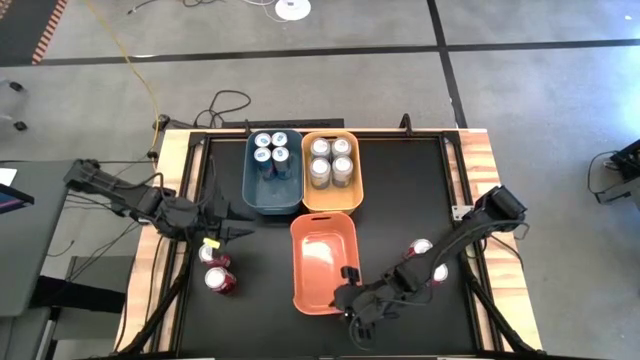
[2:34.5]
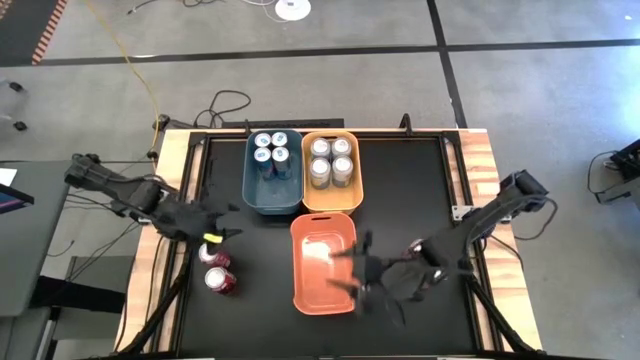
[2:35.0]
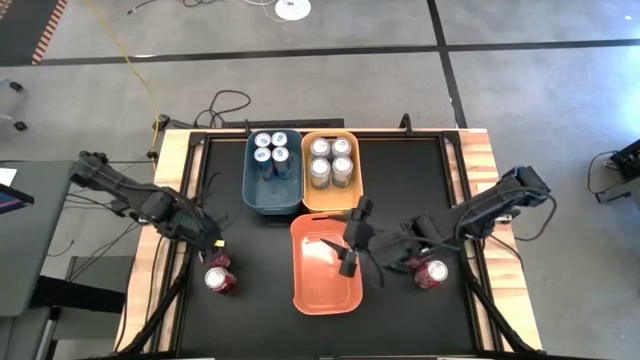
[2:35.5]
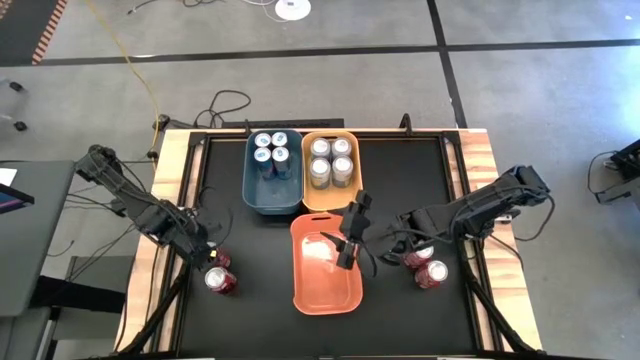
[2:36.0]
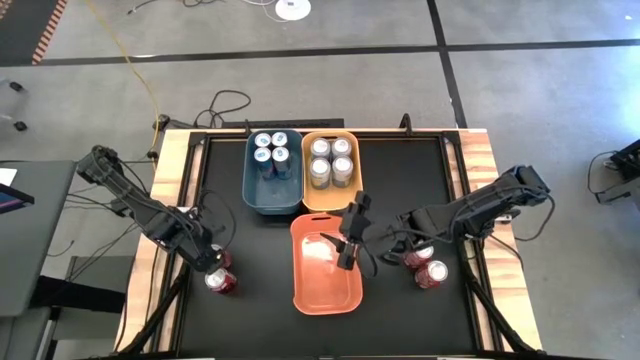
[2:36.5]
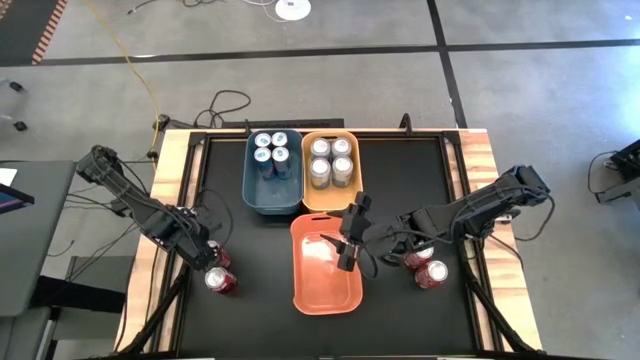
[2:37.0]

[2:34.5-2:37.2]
Task: Sort soda cans
Put the red soda can into the orange bin

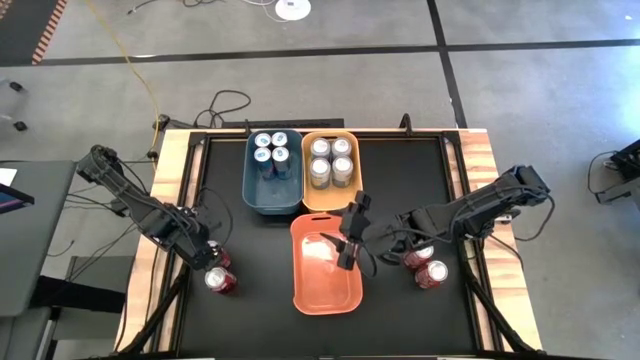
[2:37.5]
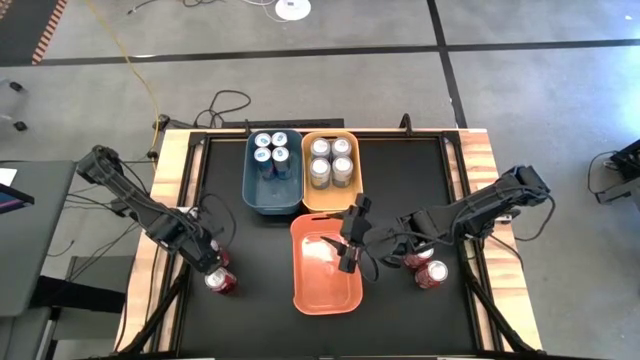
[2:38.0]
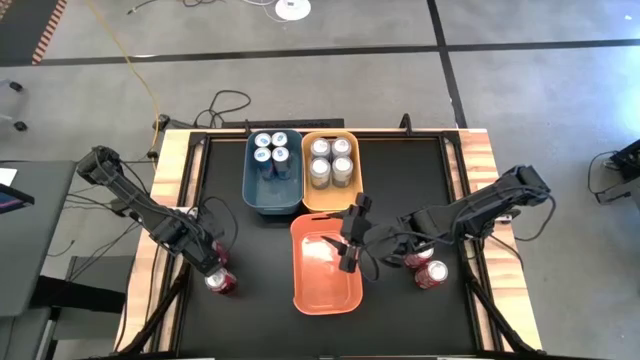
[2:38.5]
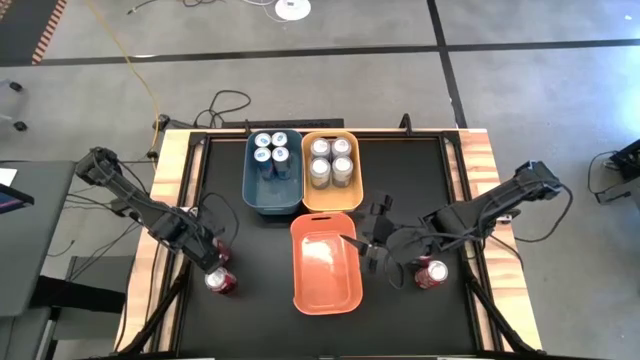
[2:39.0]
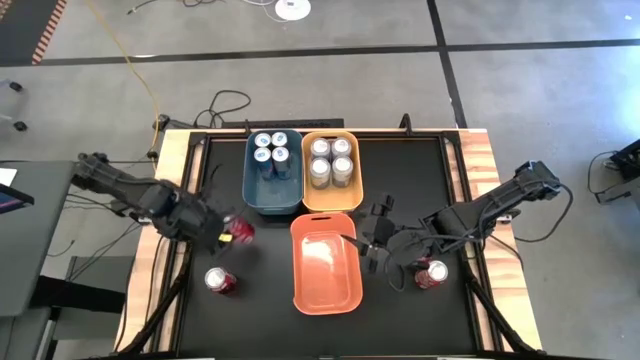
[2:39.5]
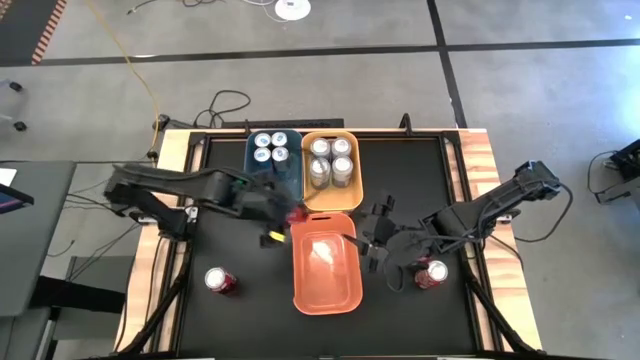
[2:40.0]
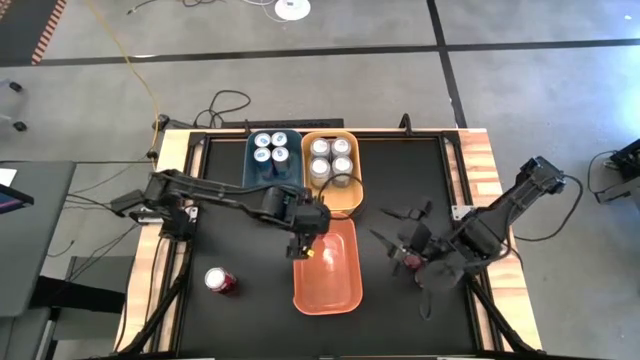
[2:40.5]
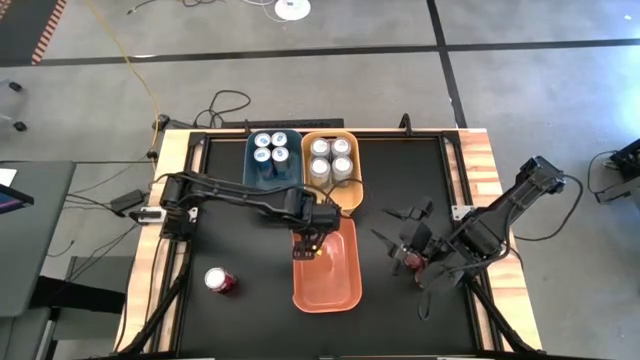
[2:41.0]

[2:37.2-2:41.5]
Put the red soda can into the orange bin

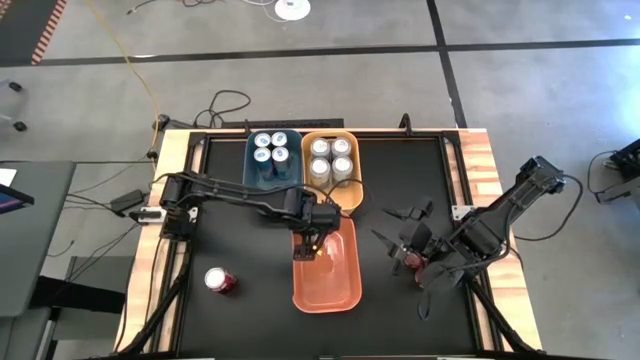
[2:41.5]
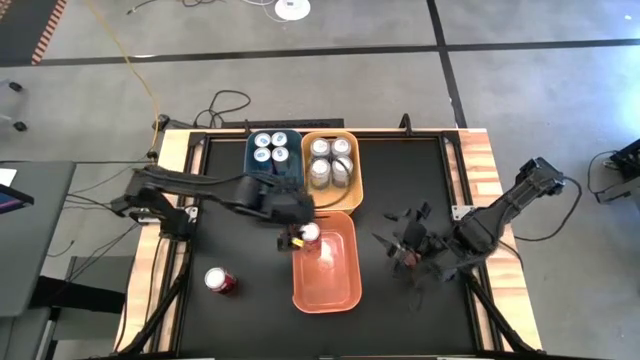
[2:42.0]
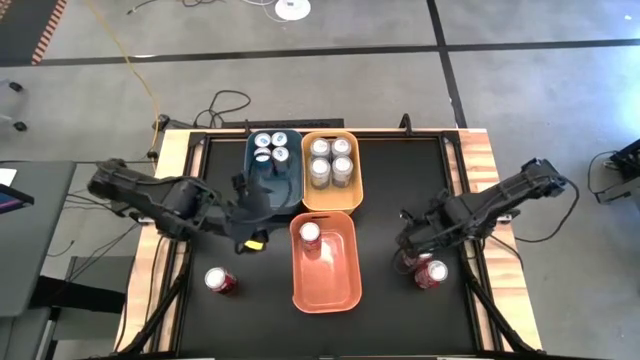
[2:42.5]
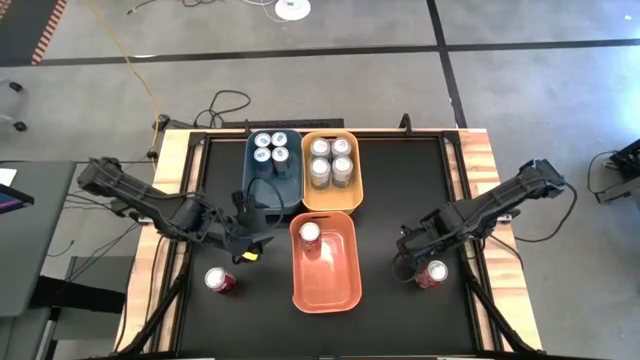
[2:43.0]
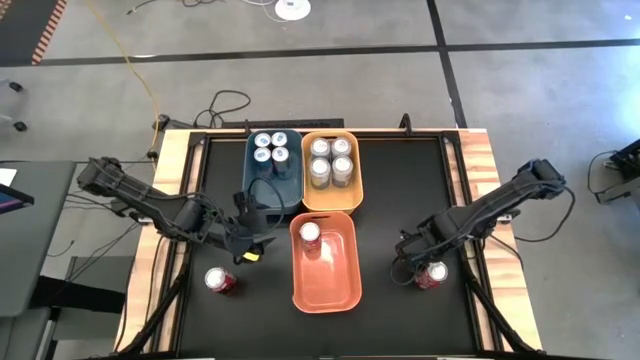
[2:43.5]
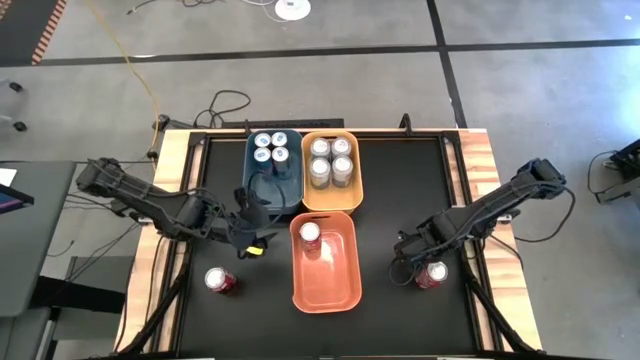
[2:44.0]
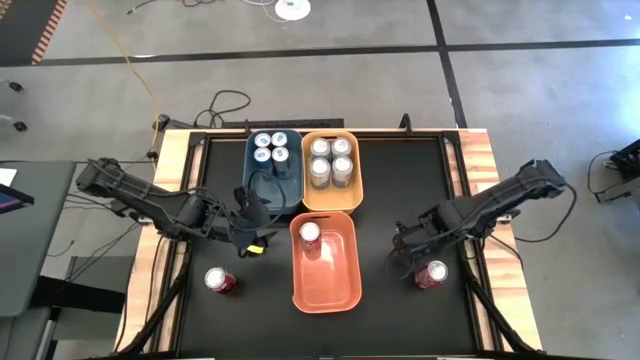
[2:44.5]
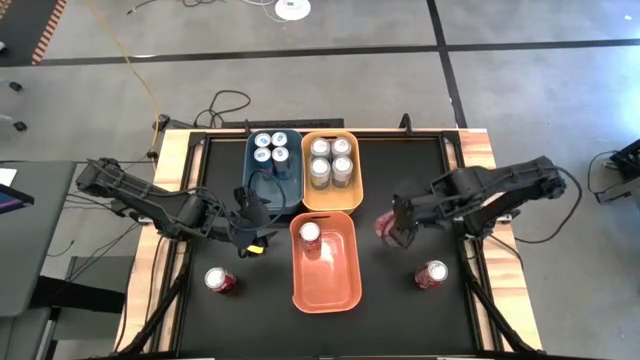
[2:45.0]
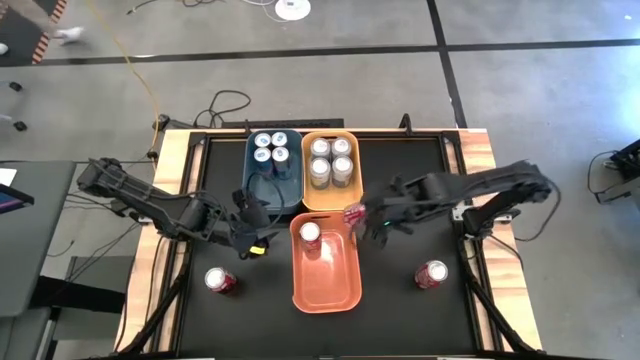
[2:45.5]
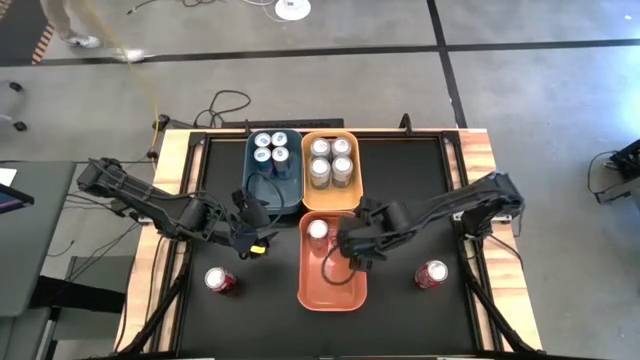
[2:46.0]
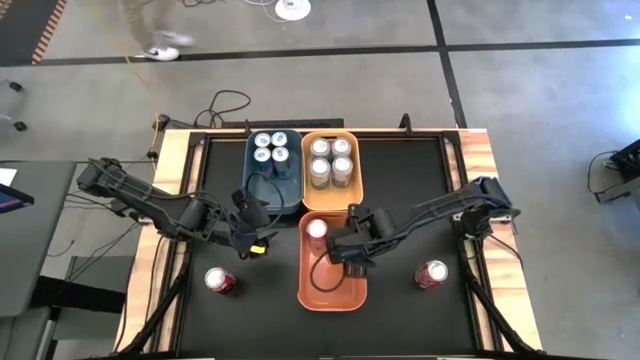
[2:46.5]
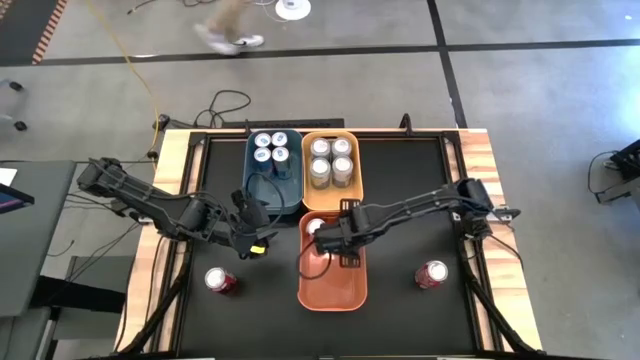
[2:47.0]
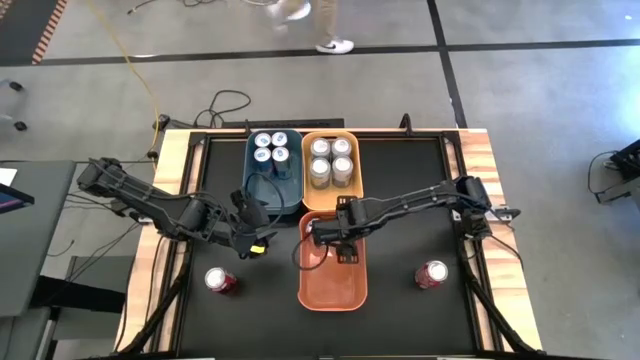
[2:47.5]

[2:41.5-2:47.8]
Put the red soda can into the orange bin

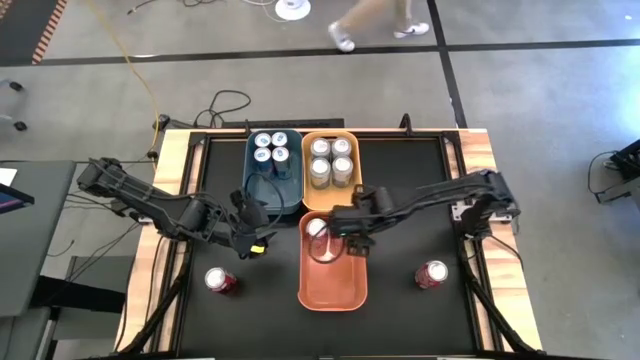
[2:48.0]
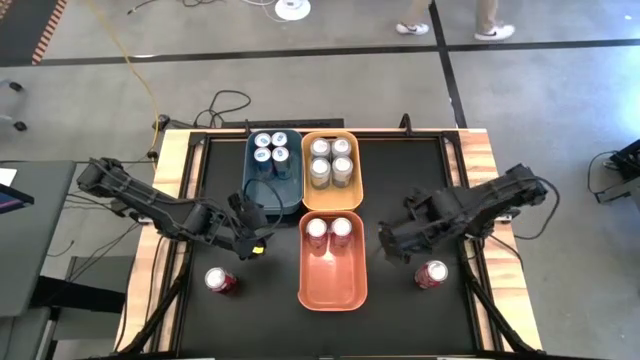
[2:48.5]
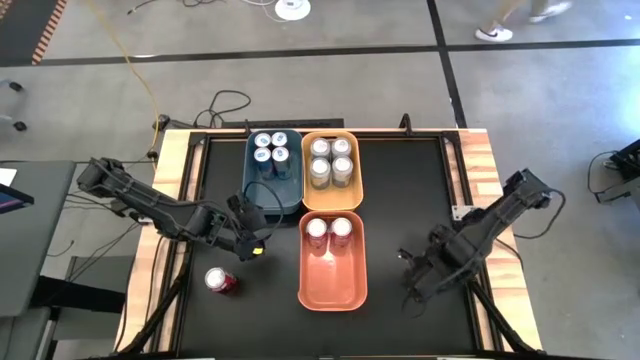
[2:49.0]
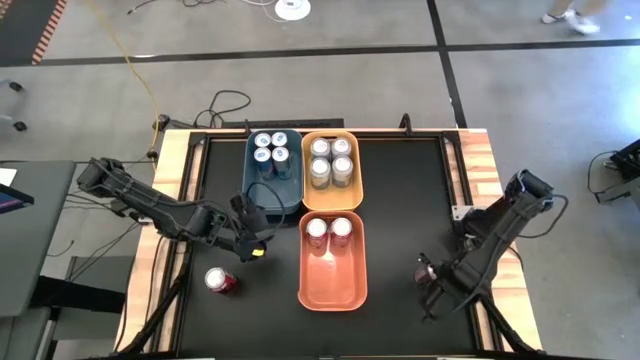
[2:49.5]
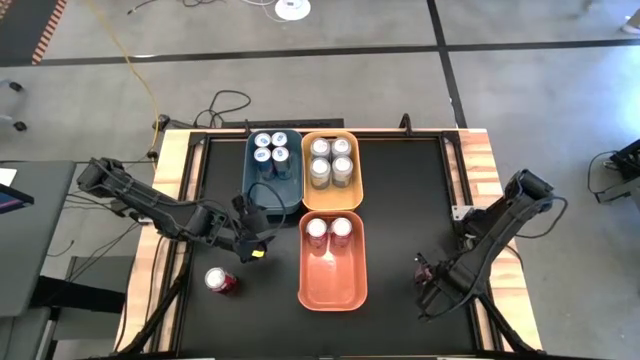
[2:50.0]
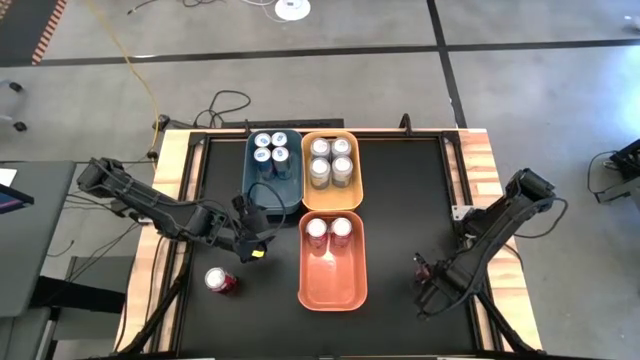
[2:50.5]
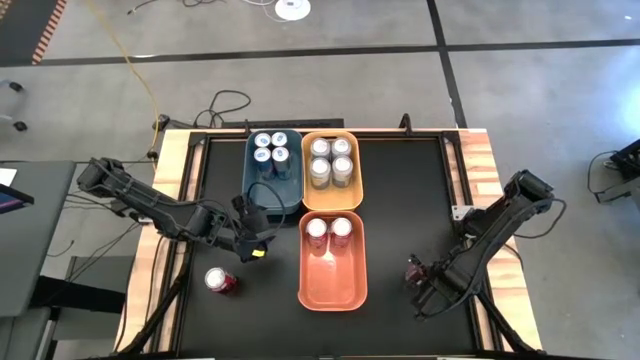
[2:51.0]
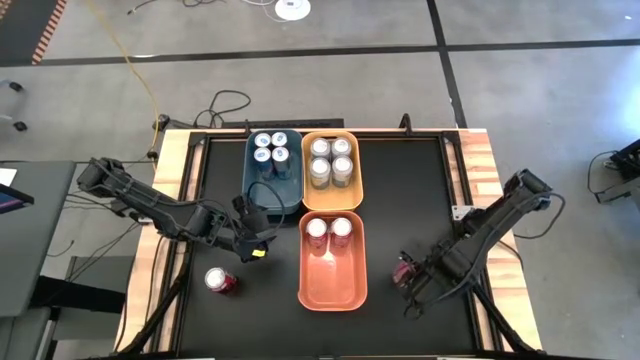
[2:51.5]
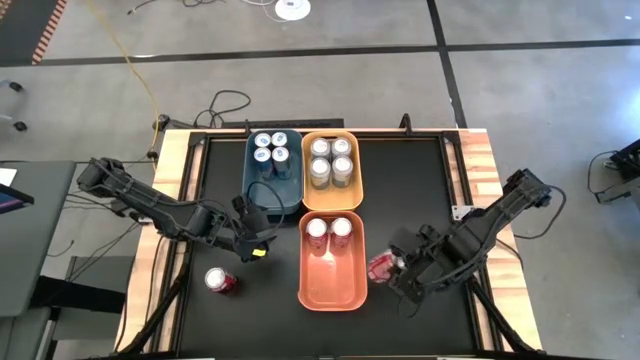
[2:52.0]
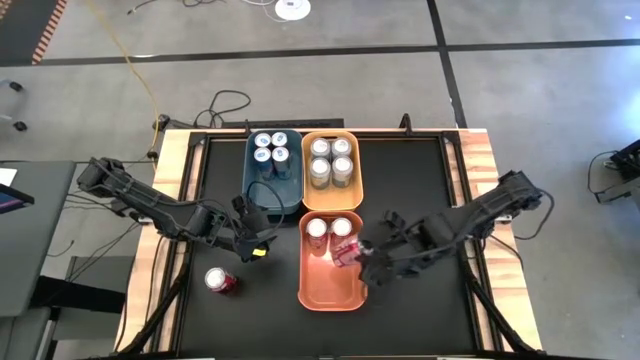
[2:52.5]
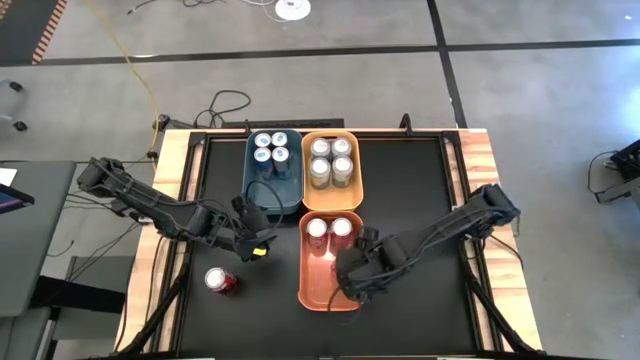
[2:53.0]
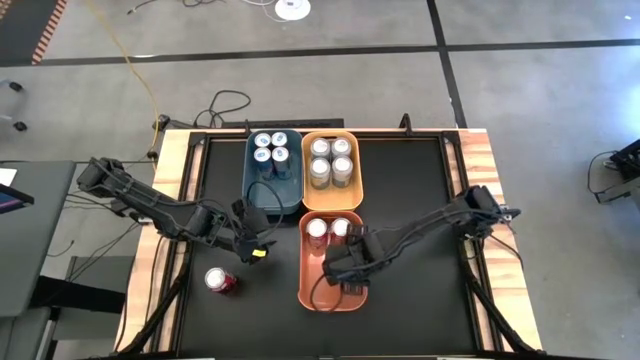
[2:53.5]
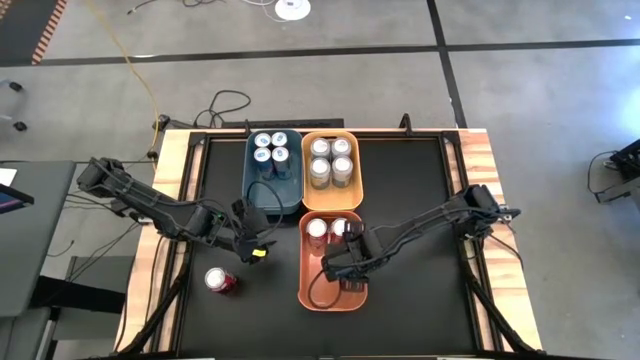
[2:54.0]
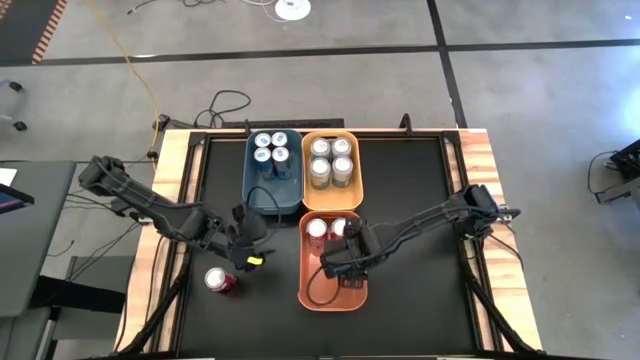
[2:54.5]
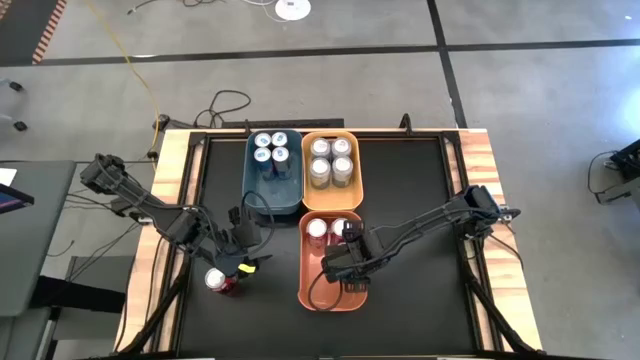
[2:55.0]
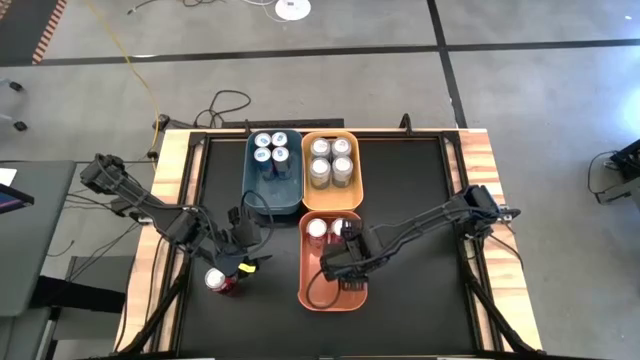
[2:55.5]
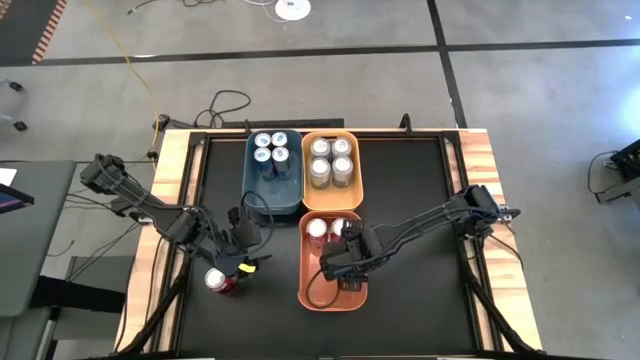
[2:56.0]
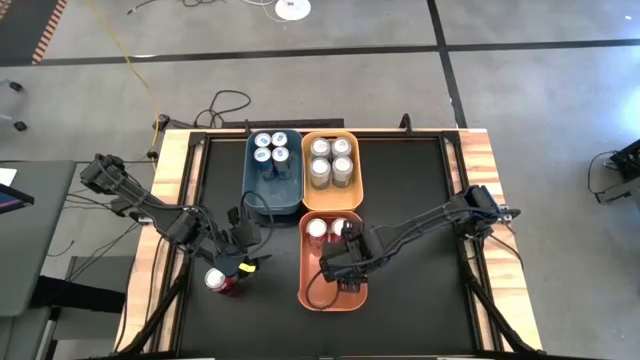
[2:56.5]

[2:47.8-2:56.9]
Put the red soda can into the orange bin
